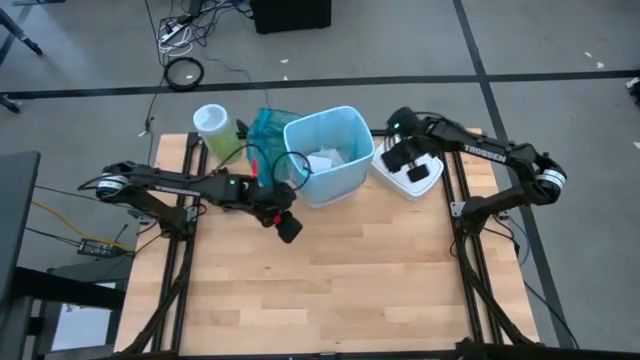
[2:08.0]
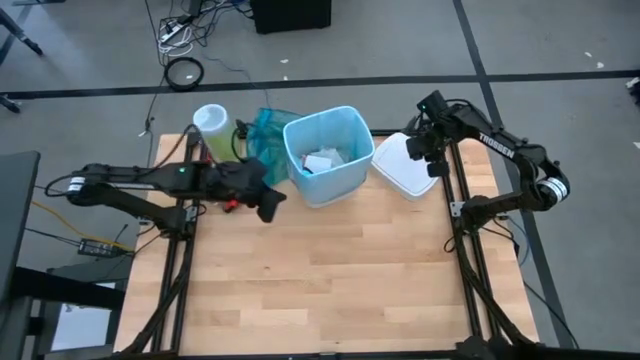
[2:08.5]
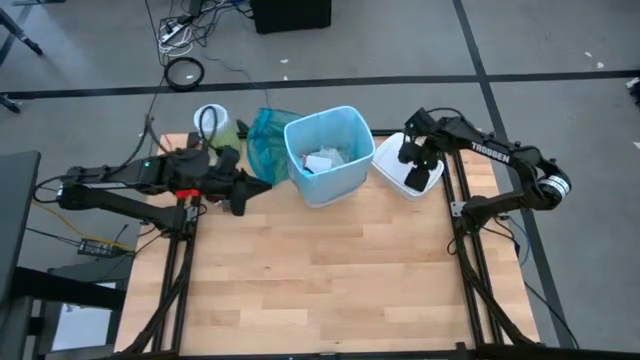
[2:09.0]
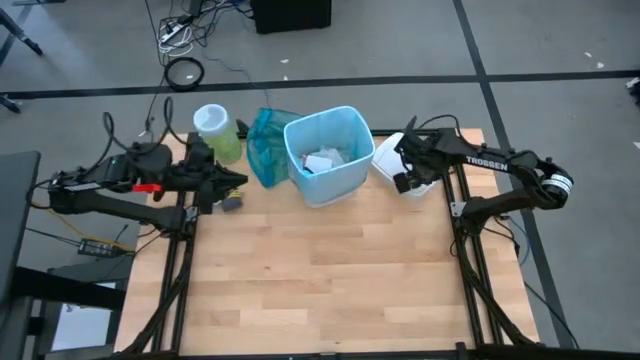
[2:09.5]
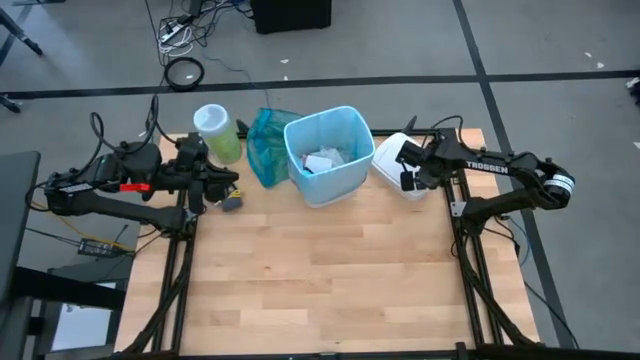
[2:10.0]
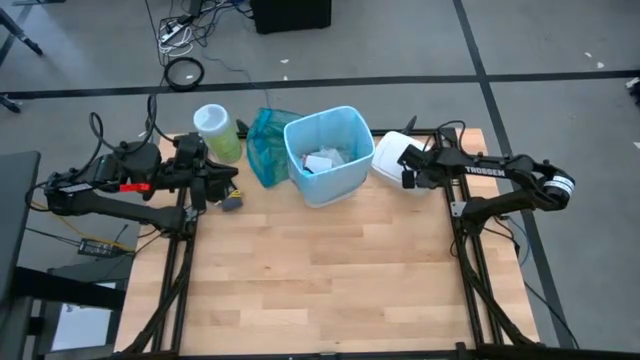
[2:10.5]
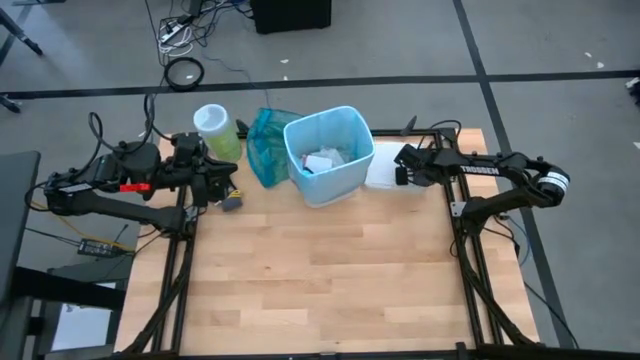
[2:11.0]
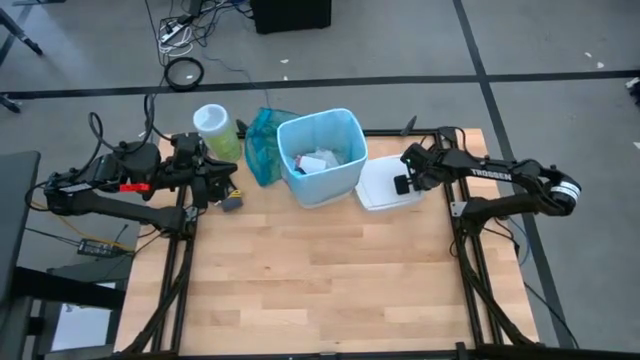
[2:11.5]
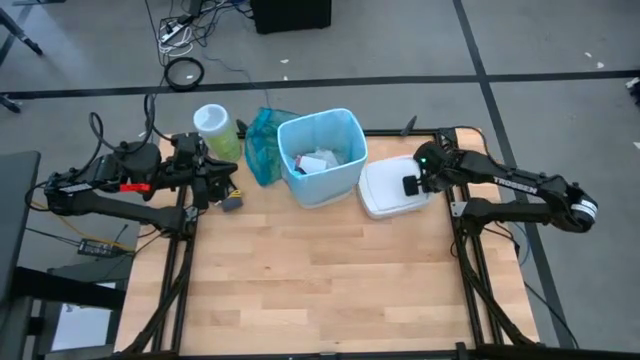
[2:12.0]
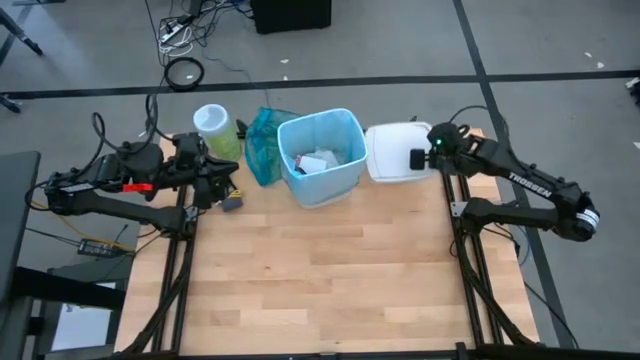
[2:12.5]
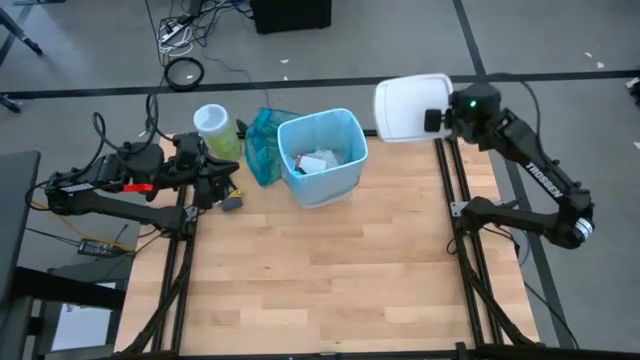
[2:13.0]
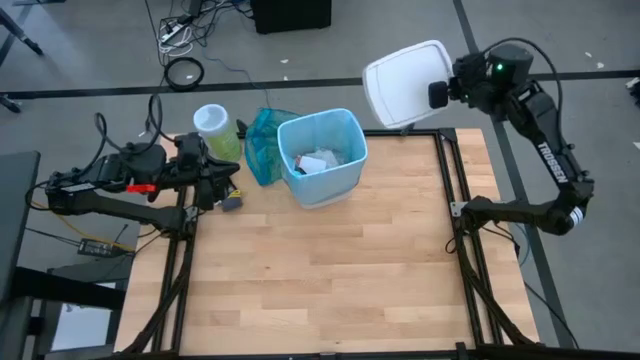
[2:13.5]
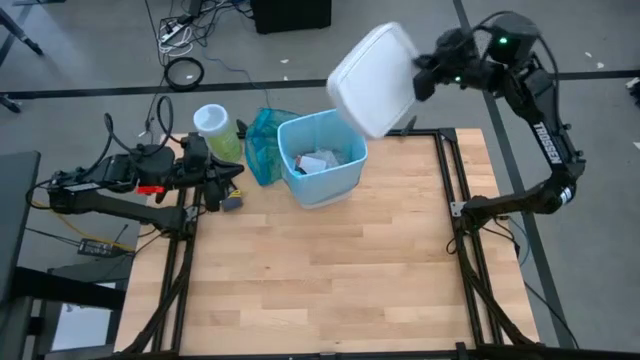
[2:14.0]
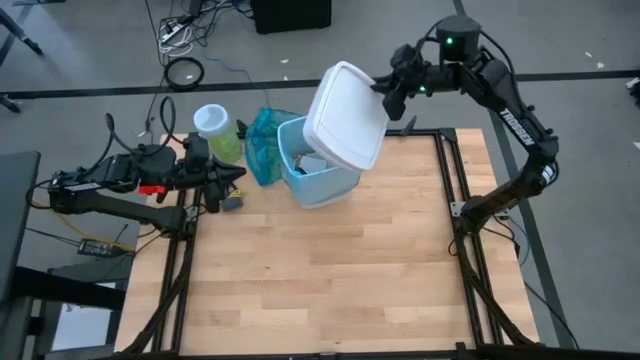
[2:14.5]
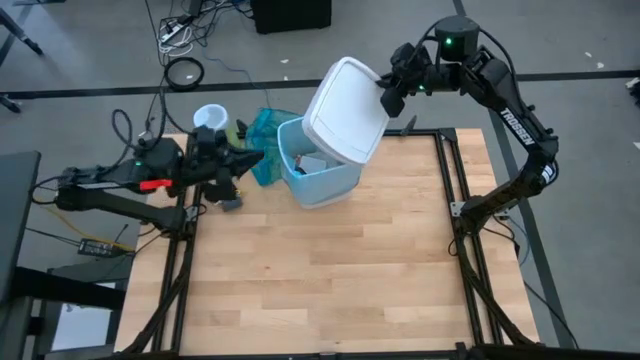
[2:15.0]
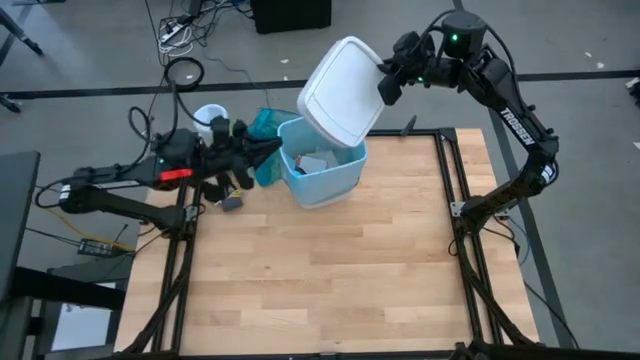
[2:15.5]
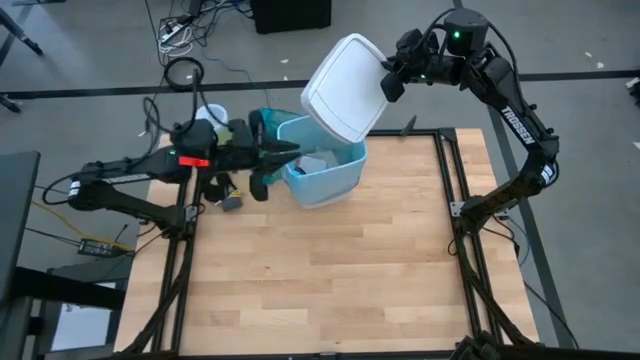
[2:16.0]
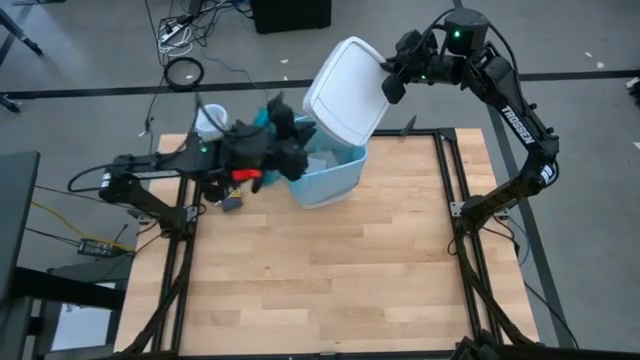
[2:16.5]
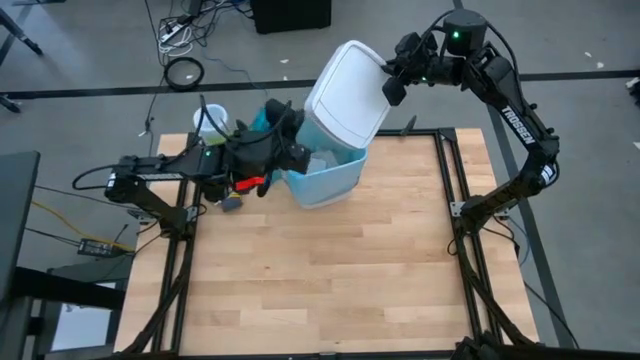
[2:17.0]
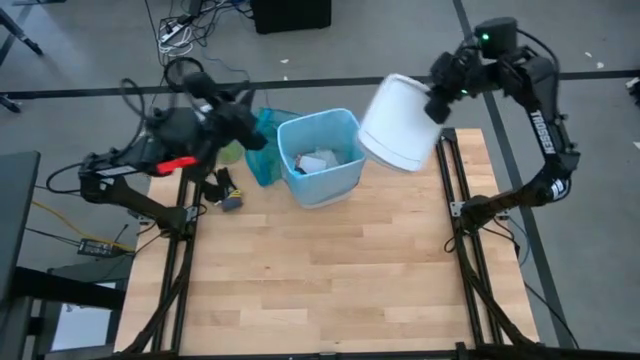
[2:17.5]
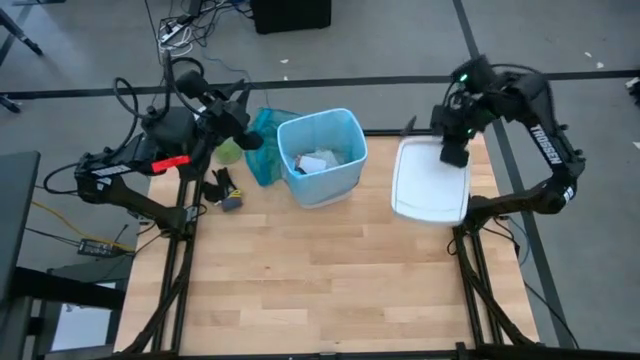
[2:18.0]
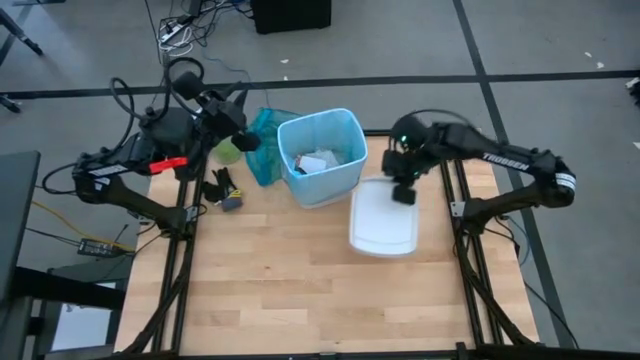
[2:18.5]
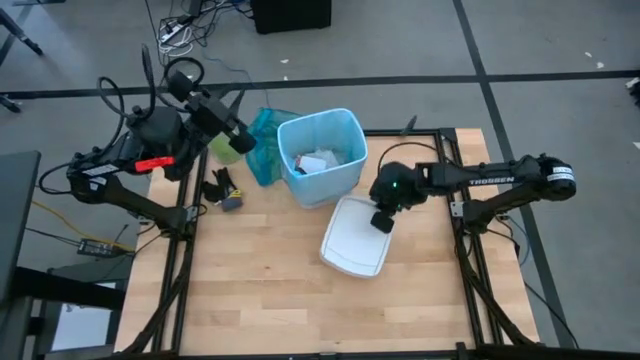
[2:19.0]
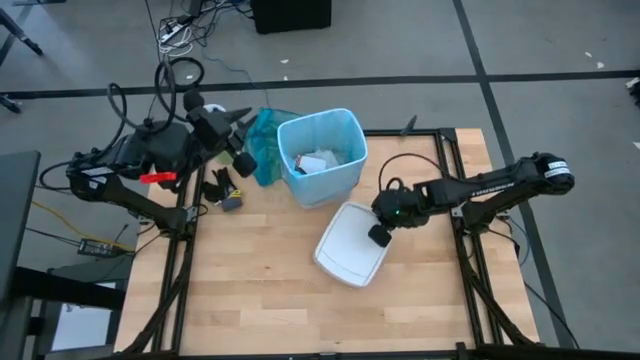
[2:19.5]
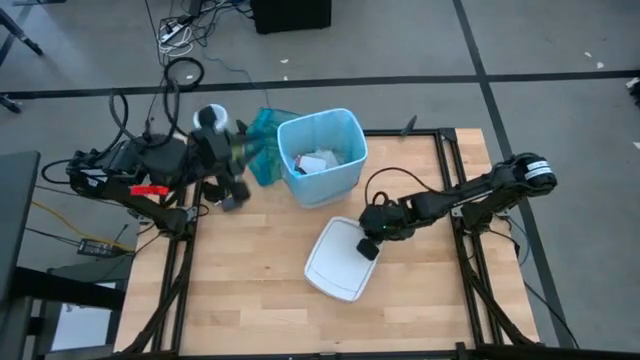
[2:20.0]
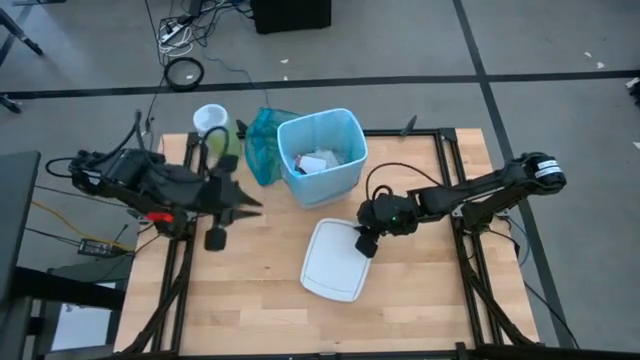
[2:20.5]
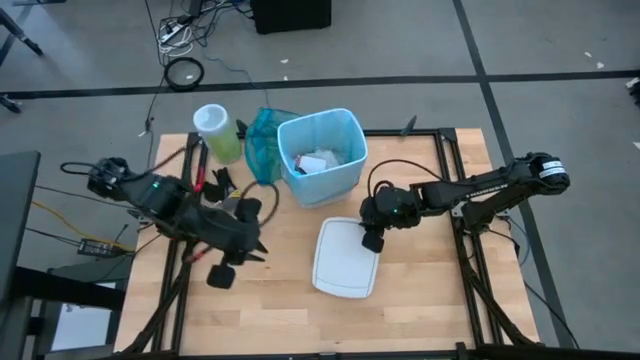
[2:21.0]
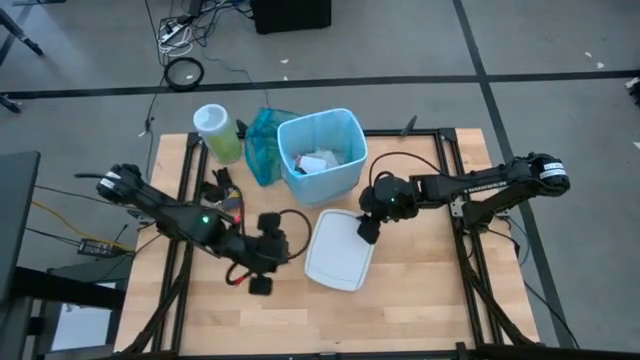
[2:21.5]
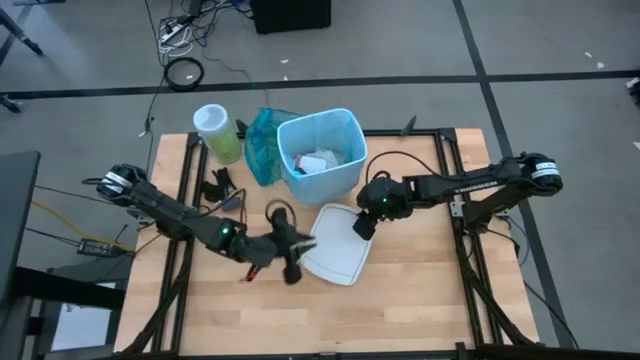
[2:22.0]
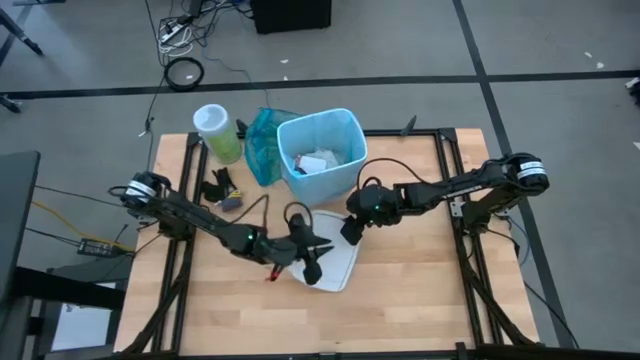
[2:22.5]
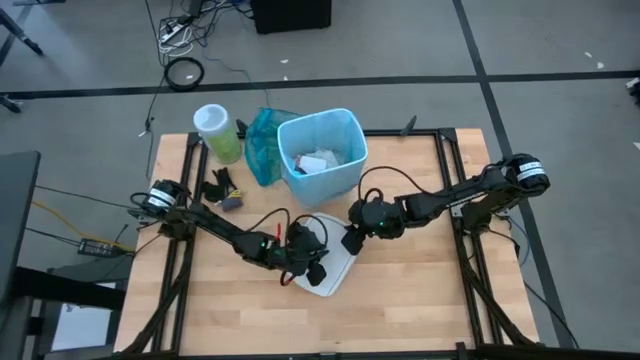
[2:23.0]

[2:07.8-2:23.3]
Task: place trash/remove bag and relplace
Put the white trash lid on the white trash bin

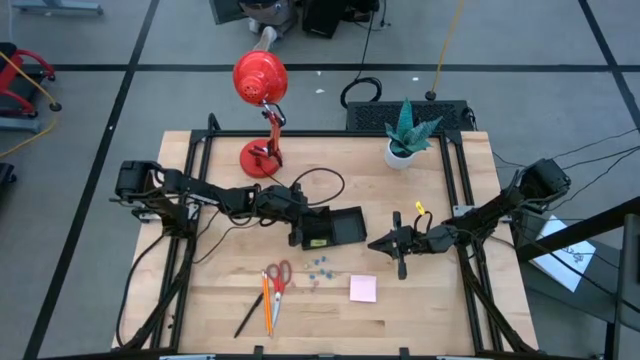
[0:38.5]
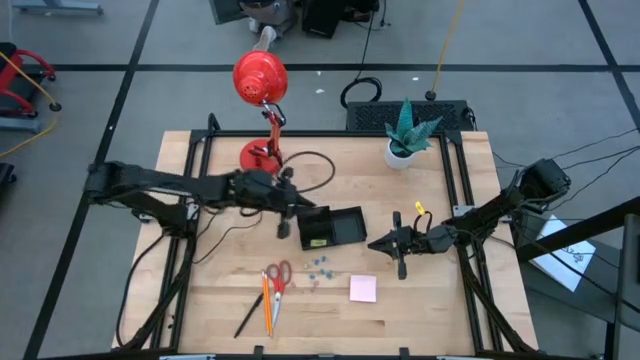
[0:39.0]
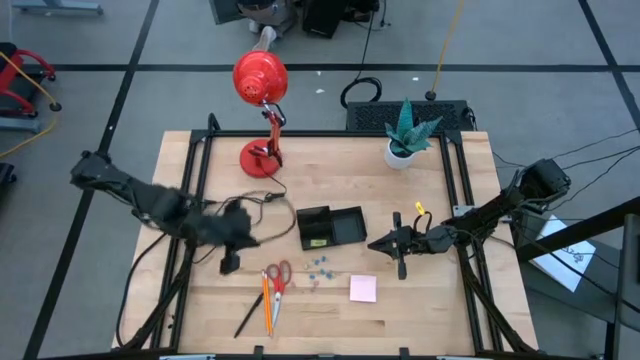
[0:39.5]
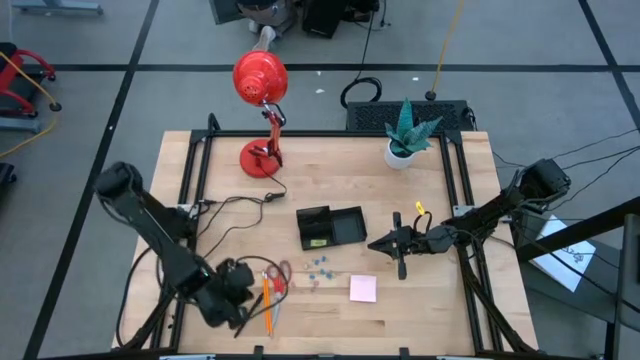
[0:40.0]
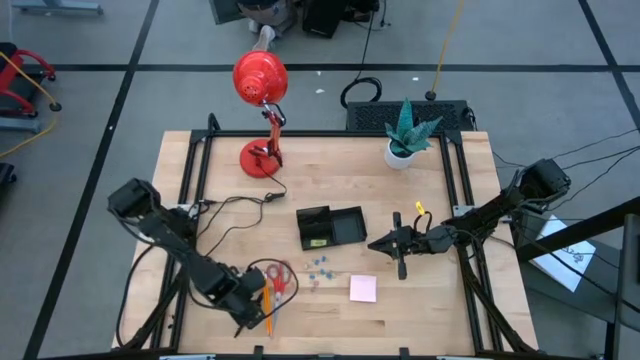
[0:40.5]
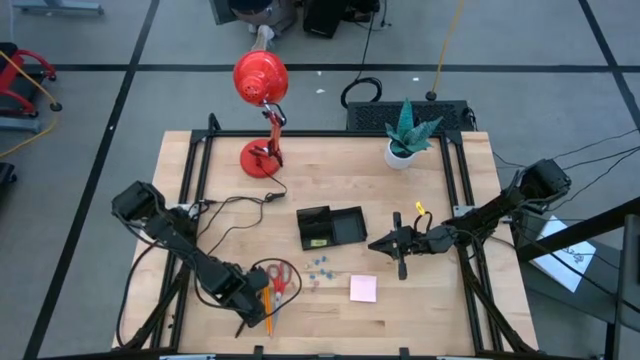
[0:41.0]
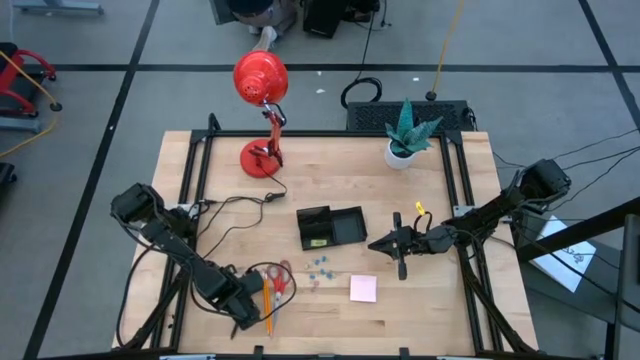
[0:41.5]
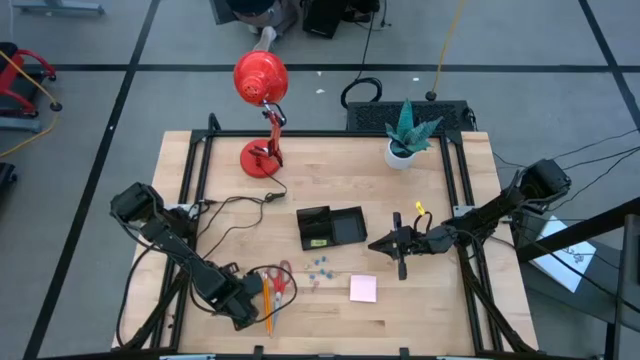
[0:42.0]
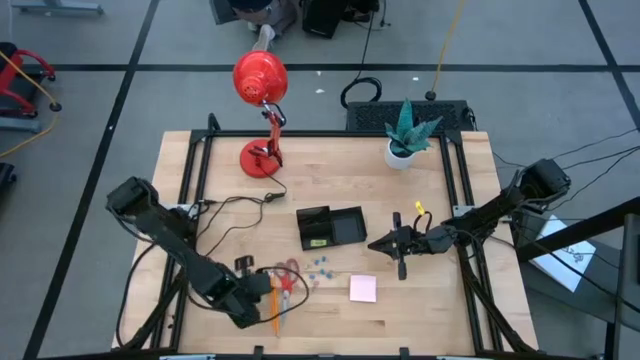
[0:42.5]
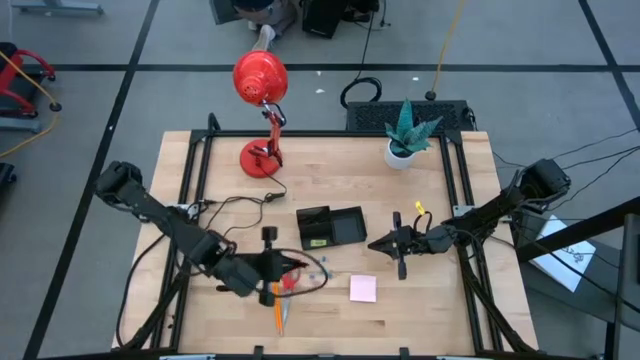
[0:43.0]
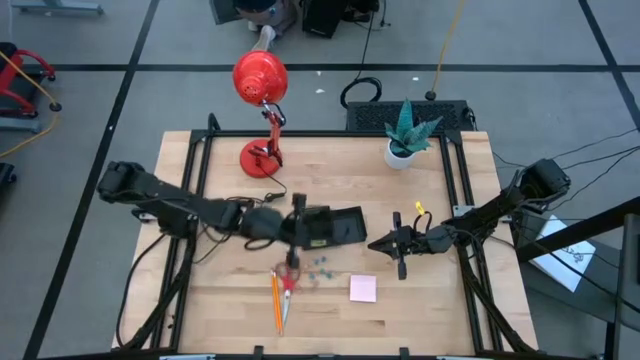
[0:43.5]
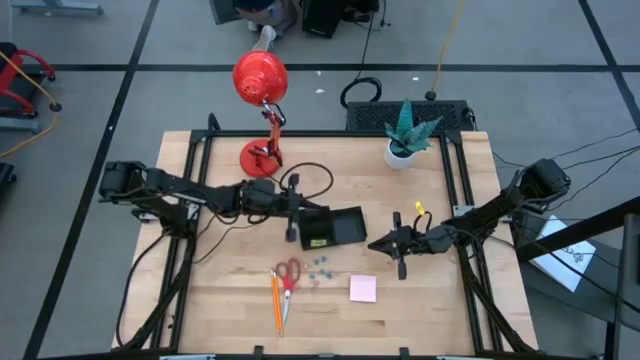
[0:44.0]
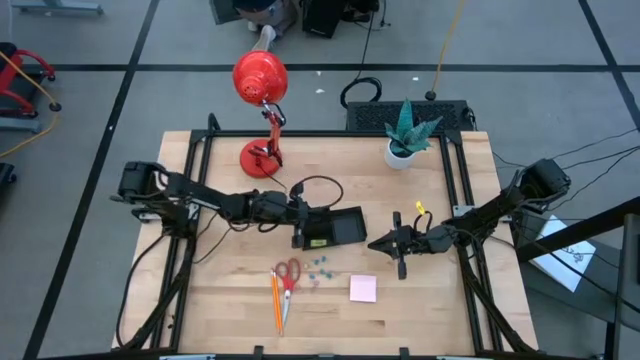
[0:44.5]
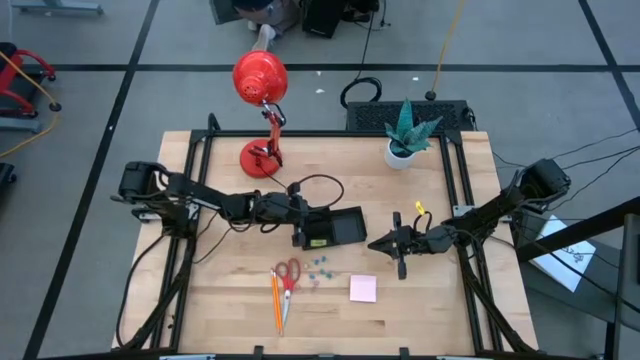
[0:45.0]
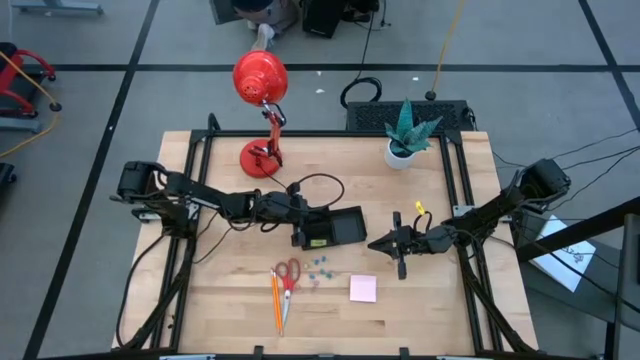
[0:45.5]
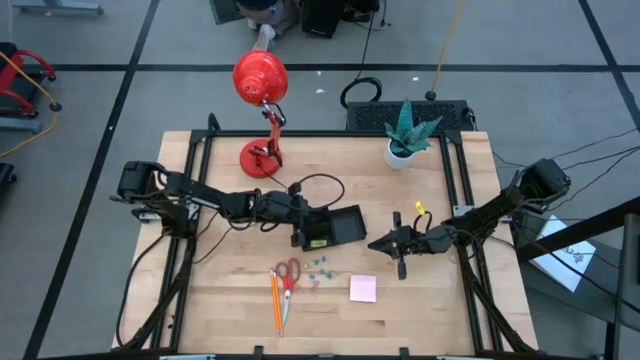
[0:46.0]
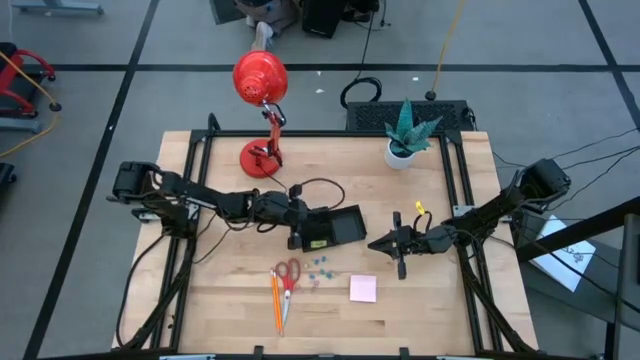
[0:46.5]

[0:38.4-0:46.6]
Task: Pick and place office supplies into organizer
Put the black pen into the desk organizer
